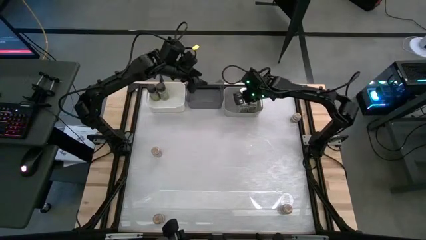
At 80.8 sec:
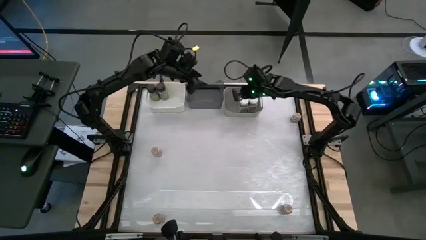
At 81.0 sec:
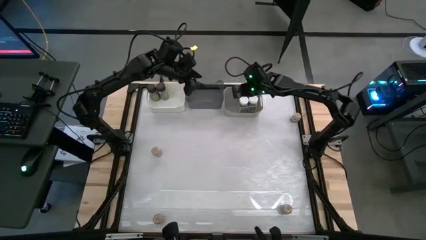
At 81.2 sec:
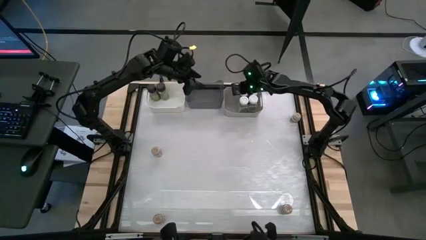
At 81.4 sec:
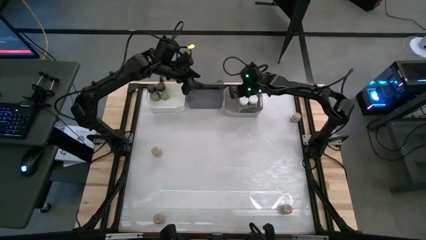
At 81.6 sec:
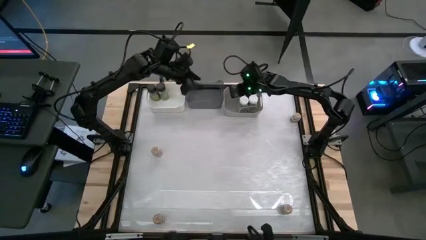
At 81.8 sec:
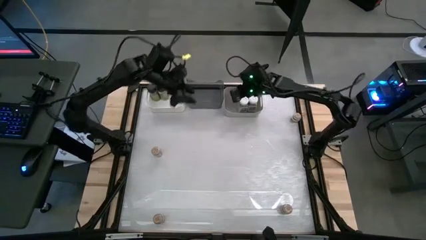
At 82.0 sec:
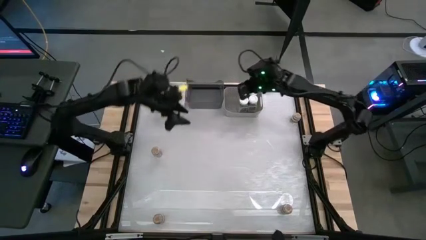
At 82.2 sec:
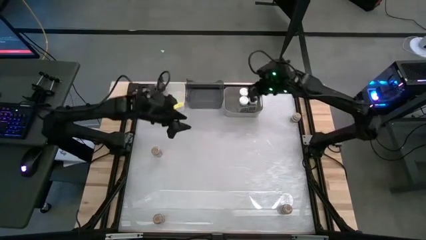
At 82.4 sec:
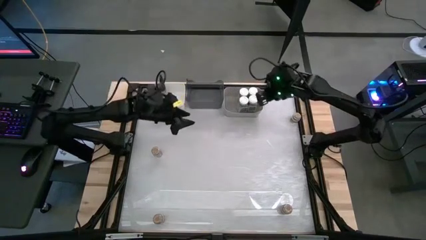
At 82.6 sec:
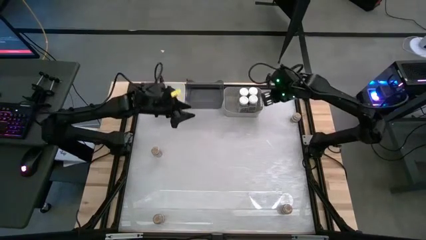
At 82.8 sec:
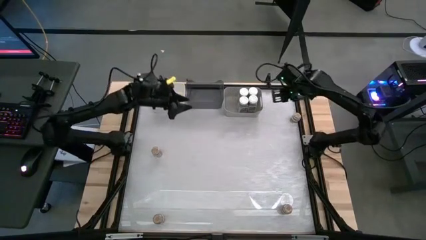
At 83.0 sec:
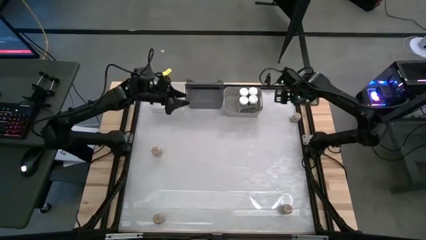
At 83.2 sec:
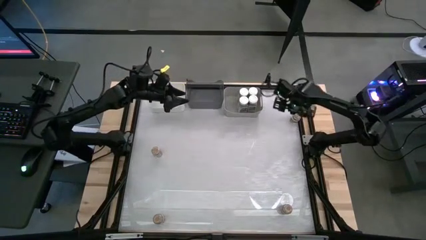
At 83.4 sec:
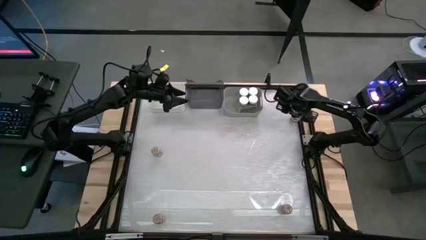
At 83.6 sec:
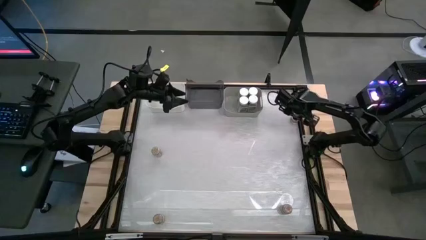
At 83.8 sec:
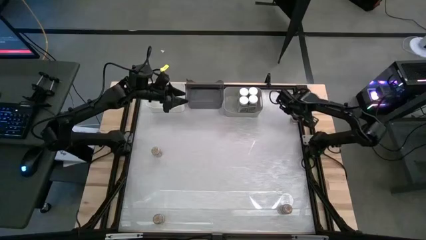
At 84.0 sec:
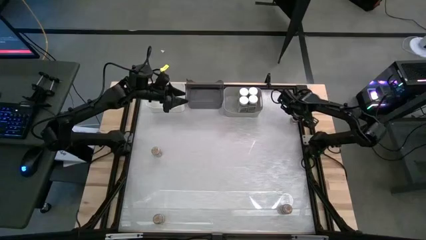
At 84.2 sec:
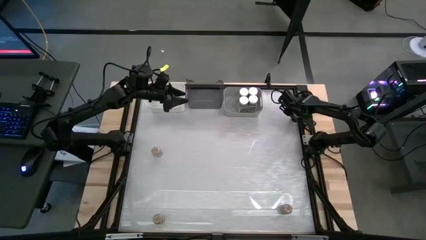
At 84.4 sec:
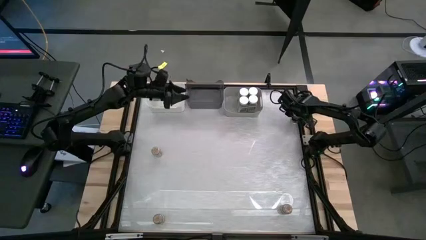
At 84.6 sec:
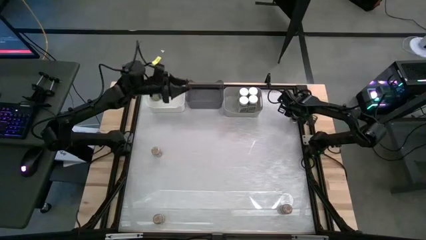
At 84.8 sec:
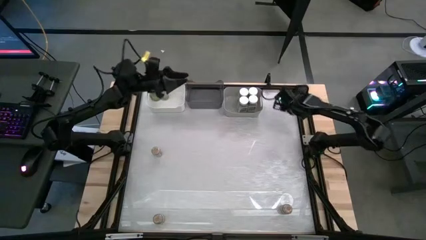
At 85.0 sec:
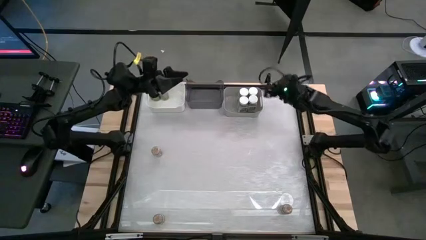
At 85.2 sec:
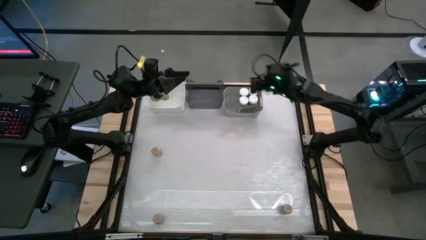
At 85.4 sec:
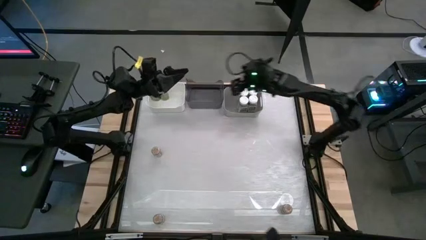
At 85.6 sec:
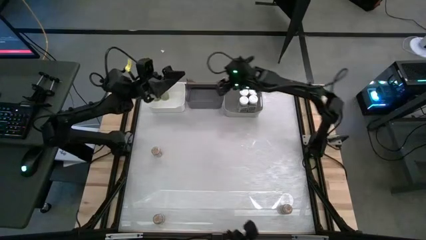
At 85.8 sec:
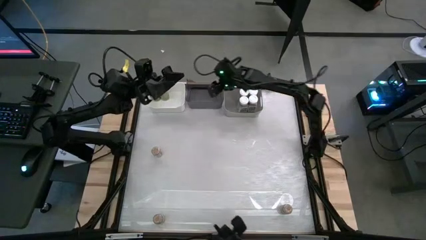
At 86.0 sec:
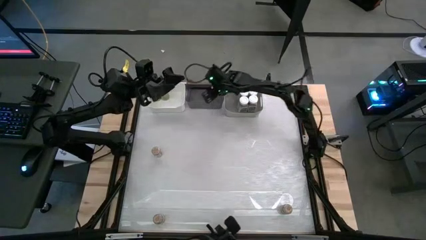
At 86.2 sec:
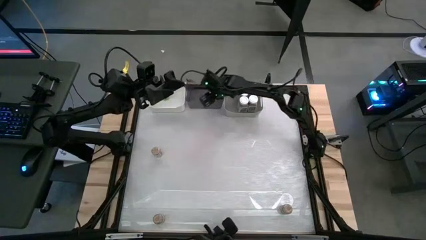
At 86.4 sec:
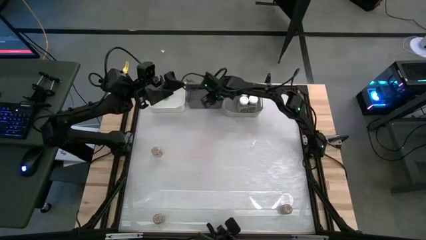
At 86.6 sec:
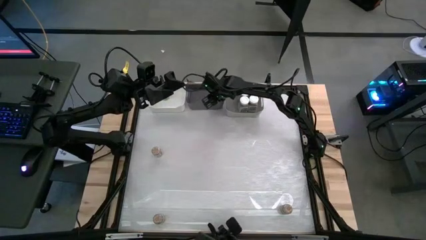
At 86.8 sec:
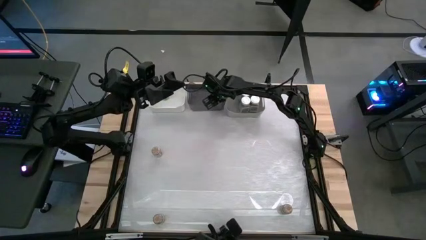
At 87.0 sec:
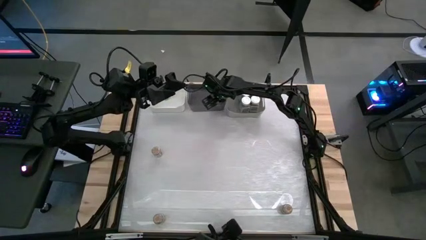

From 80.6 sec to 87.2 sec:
Task: Sort spices by type
Put the top right brown seasoning bottle into the black bin

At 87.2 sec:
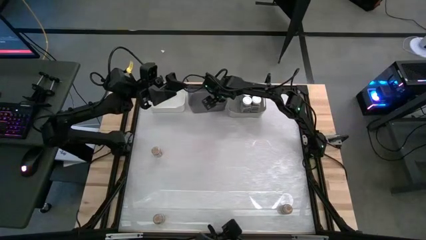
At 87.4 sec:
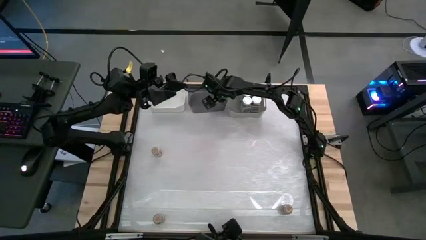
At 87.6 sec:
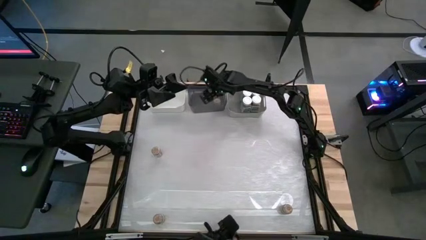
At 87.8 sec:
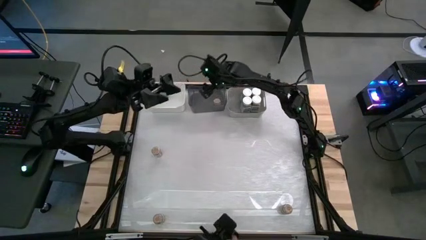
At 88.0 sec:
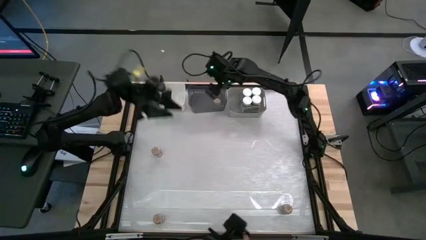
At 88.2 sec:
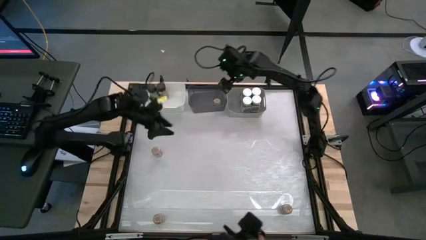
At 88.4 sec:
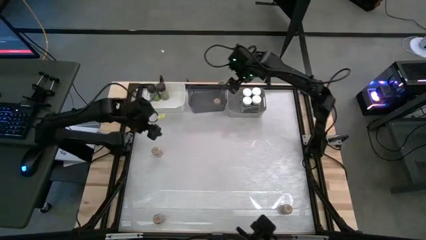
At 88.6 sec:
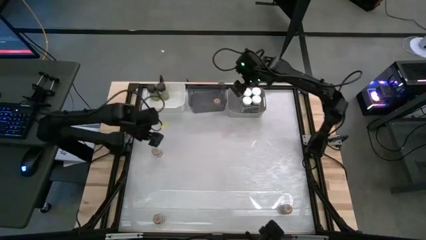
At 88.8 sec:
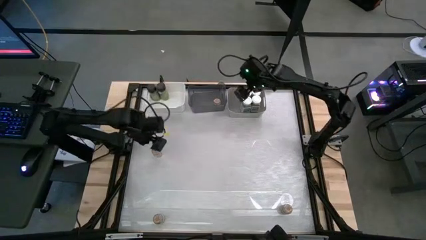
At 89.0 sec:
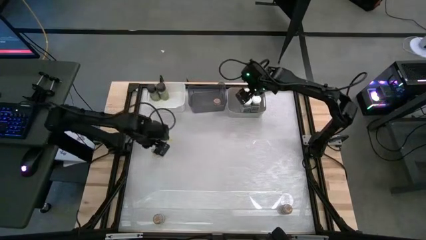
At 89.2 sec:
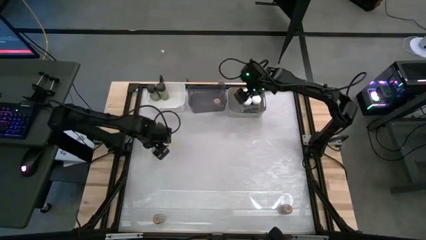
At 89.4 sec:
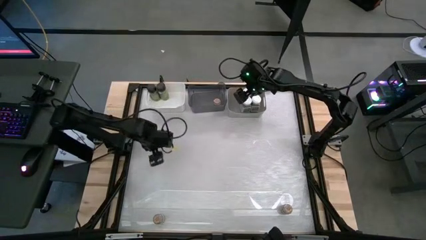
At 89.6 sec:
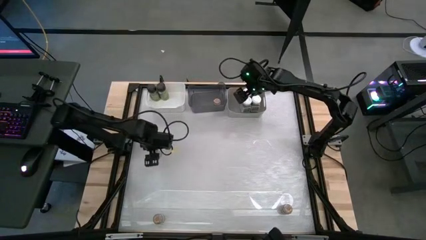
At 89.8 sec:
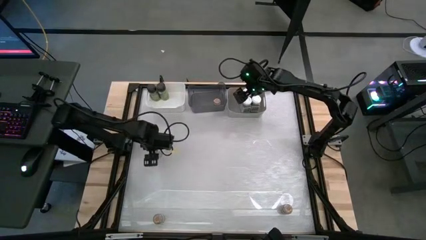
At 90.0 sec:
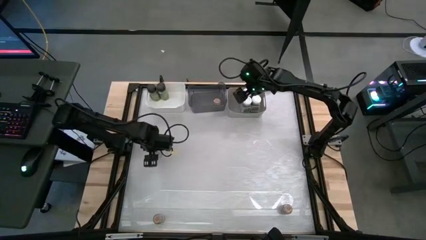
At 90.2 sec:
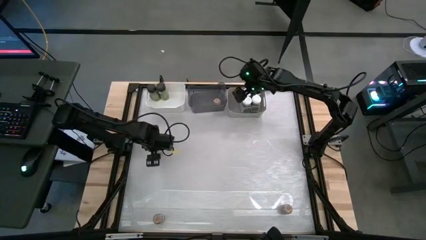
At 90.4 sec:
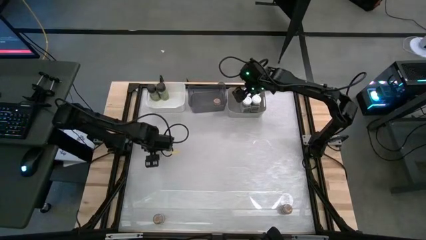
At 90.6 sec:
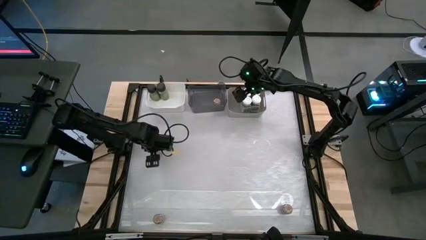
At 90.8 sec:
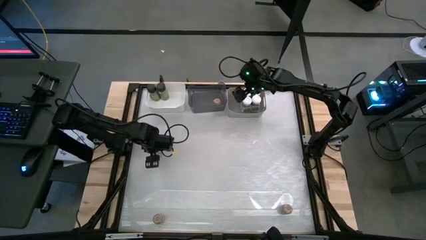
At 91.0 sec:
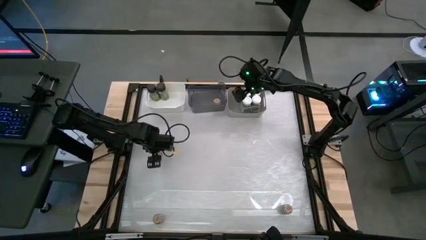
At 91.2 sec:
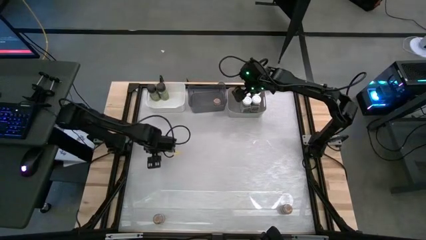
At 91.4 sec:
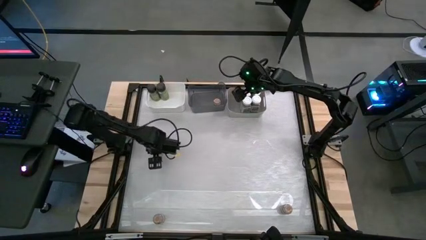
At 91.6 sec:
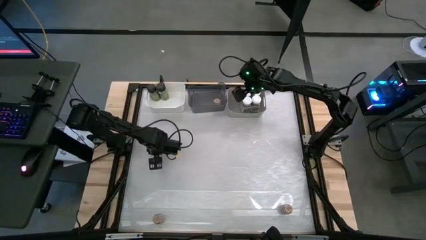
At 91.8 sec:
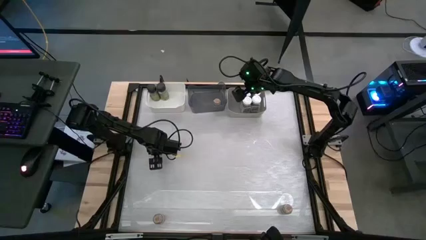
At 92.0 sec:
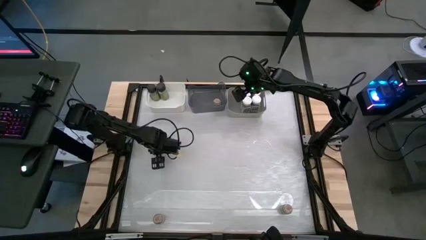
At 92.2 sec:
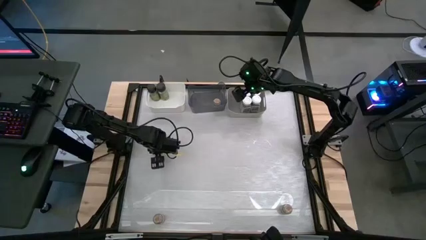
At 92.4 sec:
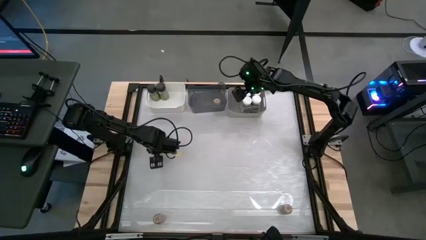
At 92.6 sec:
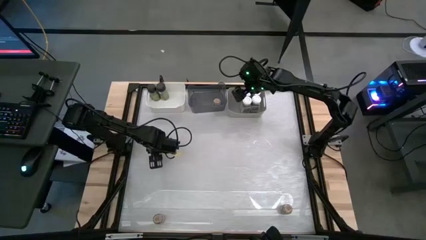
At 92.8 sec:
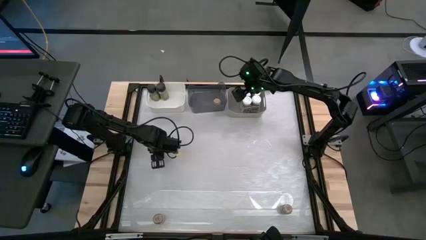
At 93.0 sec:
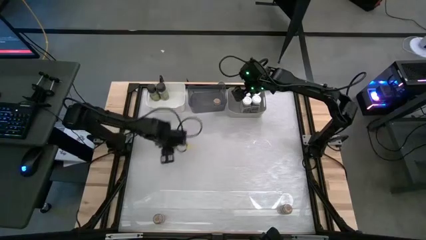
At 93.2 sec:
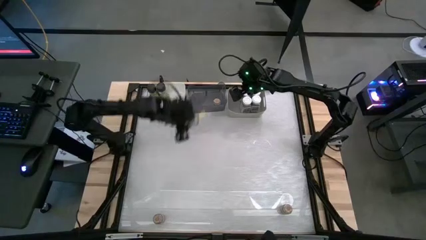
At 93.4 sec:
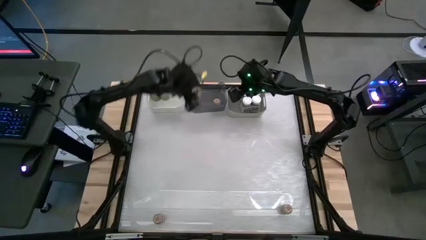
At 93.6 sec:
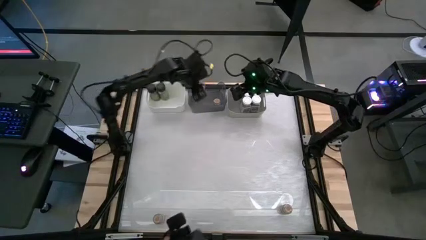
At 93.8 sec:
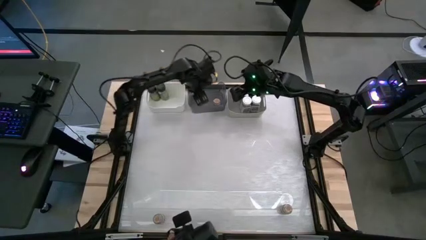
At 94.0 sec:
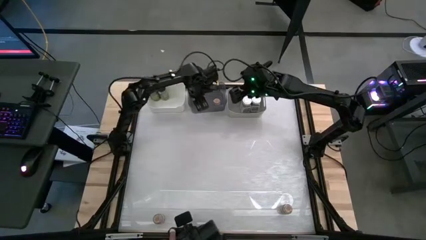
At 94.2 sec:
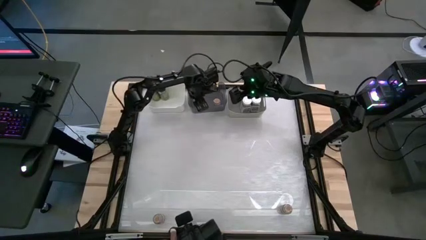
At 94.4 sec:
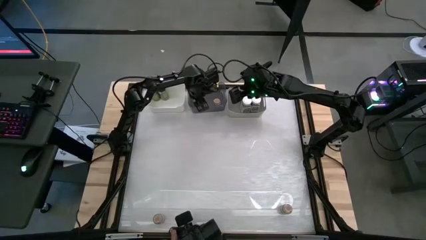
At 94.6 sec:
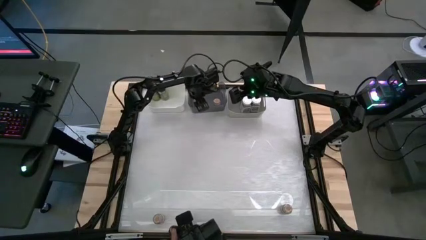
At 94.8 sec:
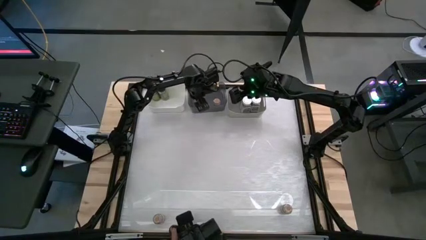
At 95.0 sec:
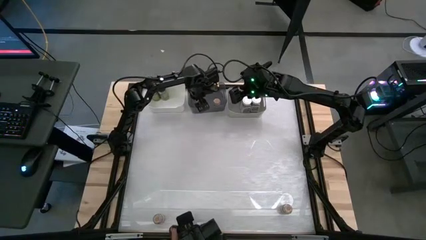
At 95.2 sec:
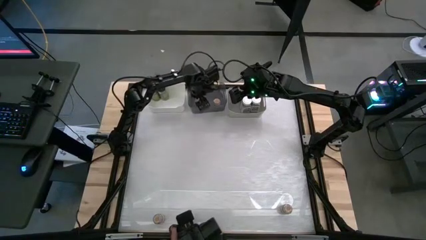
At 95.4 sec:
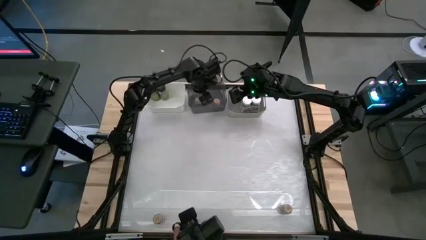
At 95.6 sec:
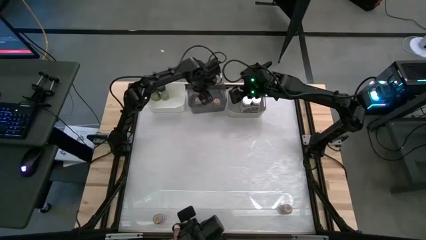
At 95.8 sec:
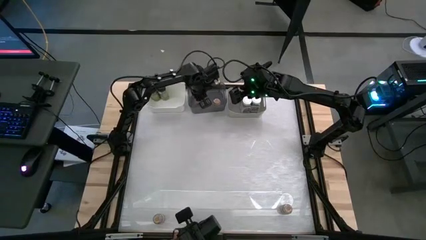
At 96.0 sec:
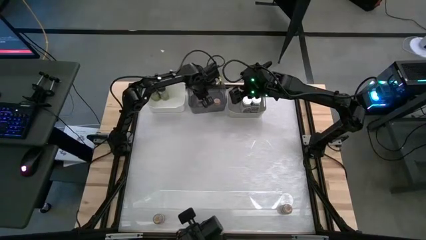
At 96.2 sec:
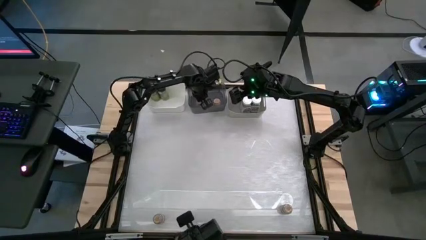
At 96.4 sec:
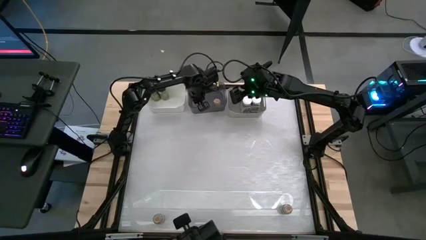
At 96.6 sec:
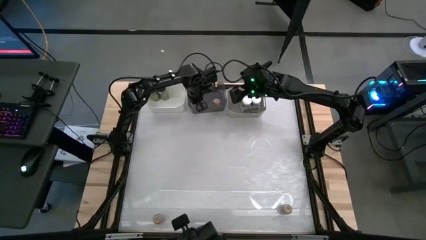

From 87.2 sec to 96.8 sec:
Put the top brown seasoning bottle into the black bin

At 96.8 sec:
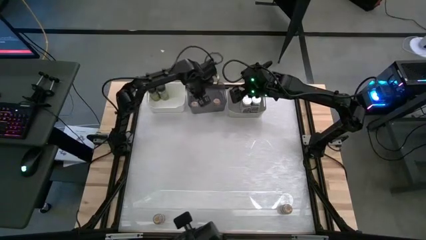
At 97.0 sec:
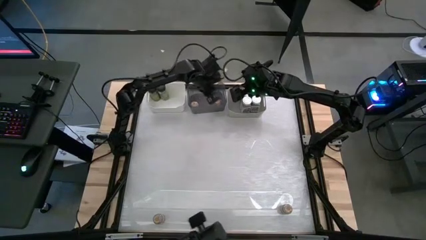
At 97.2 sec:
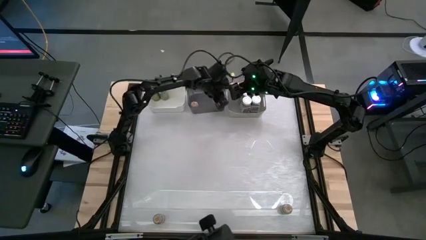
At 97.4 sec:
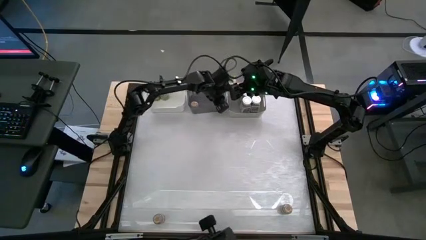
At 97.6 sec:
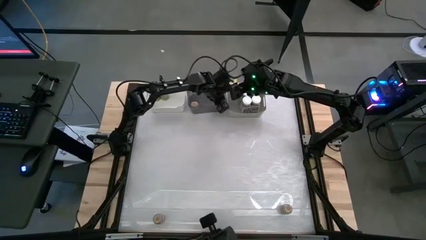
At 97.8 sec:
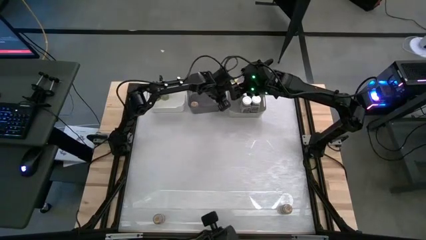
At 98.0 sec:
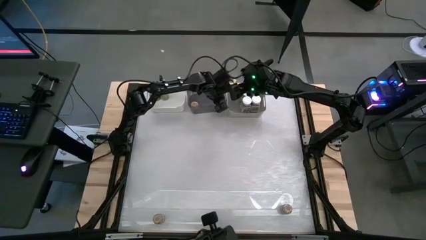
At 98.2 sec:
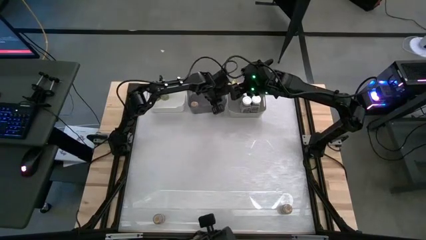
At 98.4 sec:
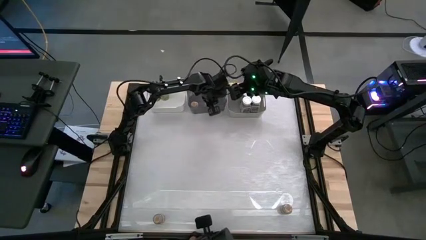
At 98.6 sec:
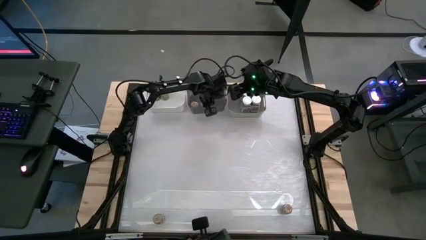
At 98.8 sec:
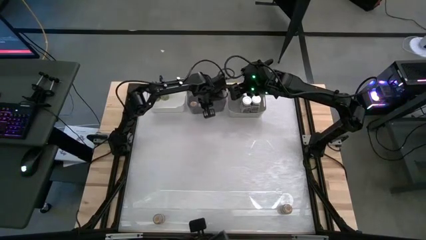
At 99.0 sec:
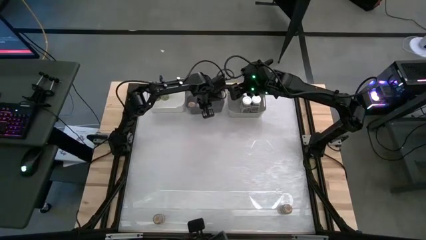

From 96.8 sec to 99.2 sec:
Adjust the brown seasoning bottle in the black bin
